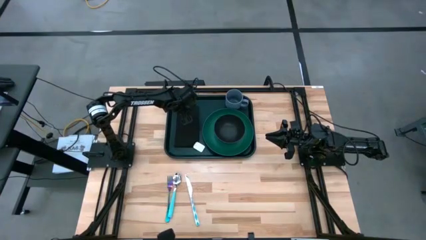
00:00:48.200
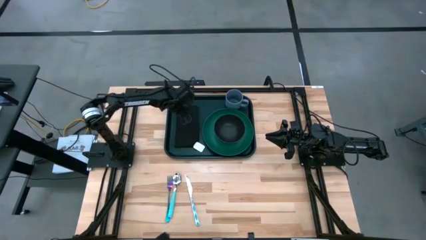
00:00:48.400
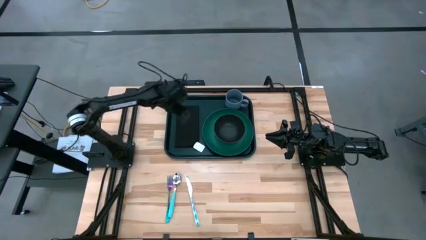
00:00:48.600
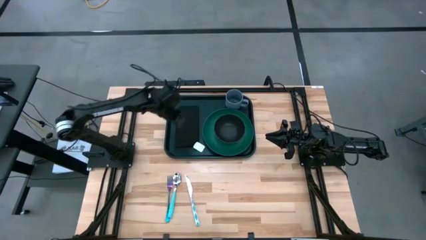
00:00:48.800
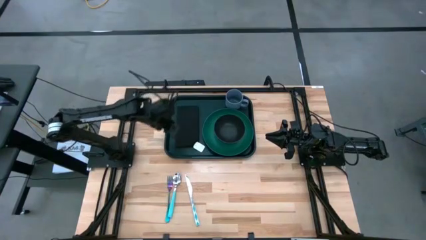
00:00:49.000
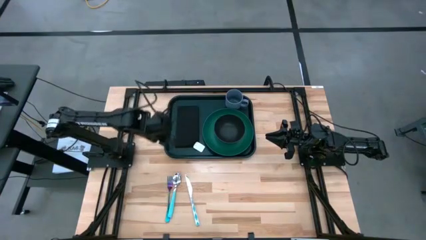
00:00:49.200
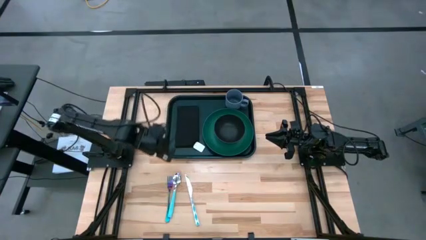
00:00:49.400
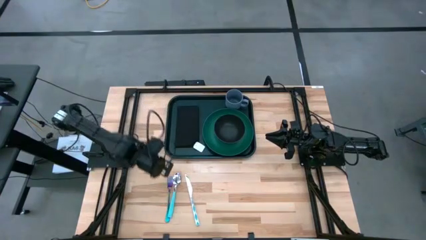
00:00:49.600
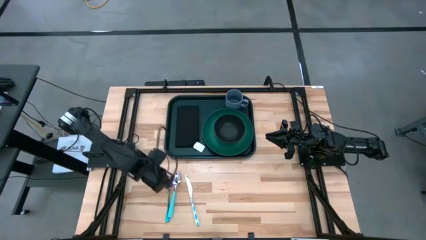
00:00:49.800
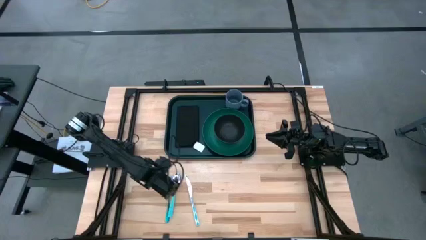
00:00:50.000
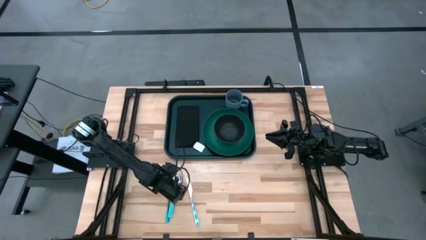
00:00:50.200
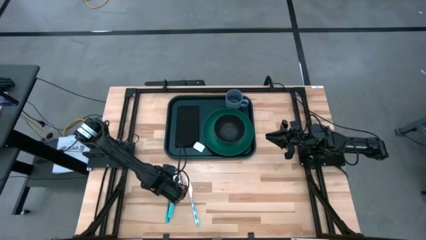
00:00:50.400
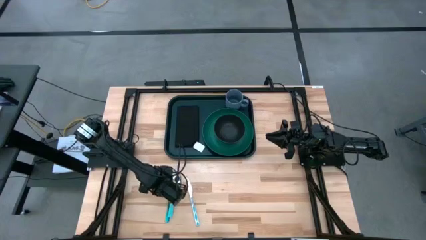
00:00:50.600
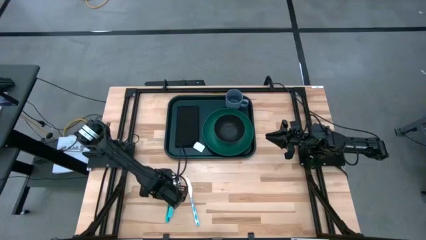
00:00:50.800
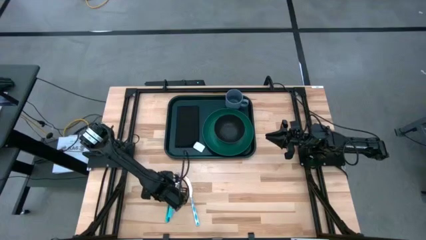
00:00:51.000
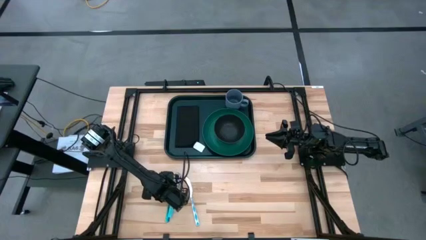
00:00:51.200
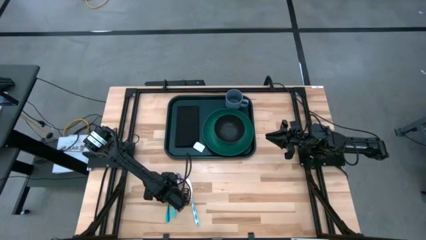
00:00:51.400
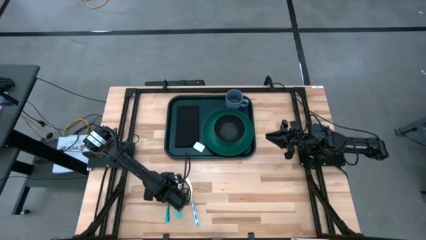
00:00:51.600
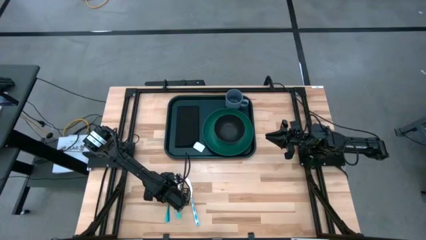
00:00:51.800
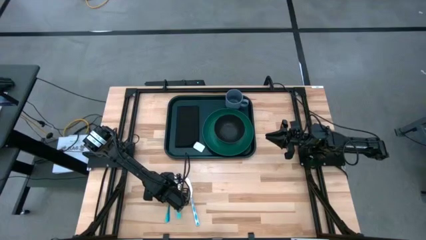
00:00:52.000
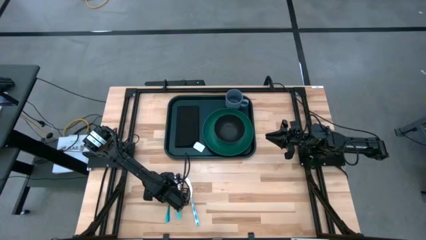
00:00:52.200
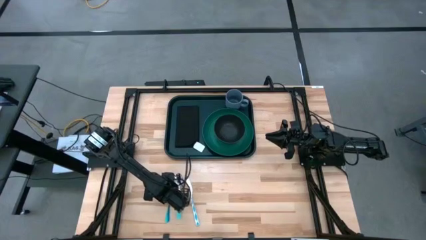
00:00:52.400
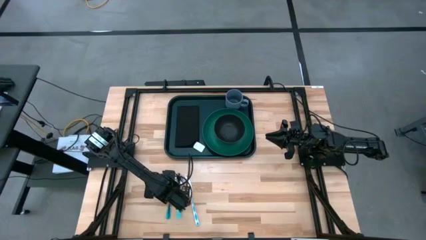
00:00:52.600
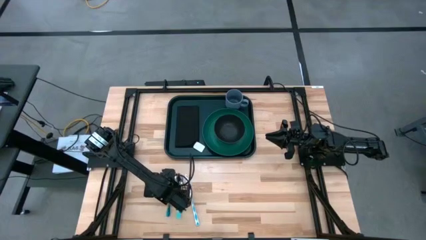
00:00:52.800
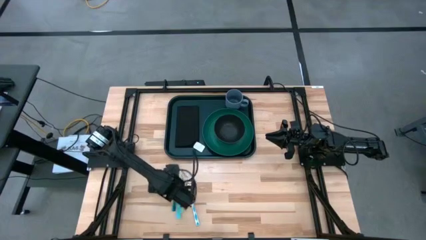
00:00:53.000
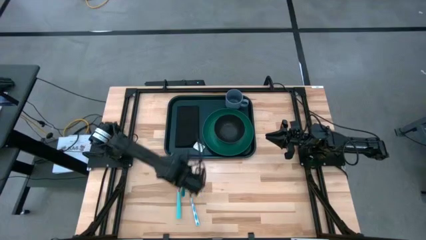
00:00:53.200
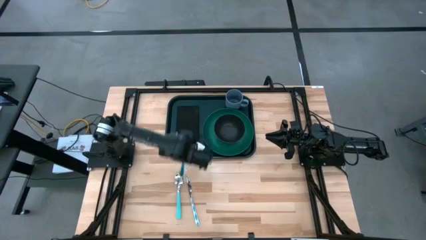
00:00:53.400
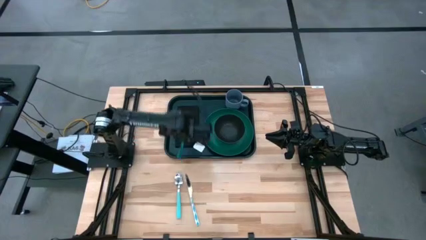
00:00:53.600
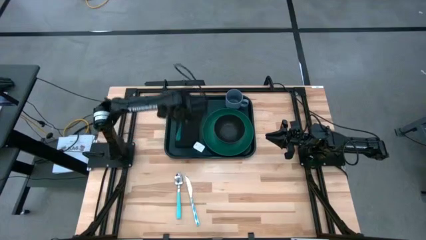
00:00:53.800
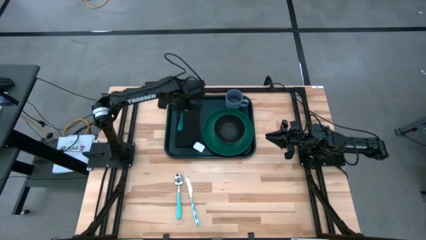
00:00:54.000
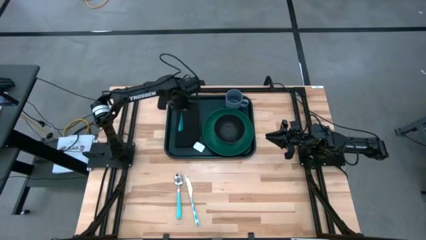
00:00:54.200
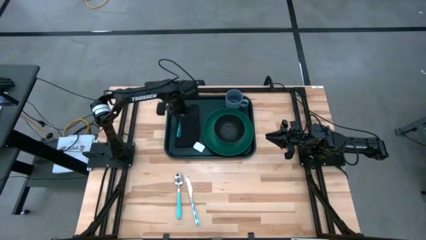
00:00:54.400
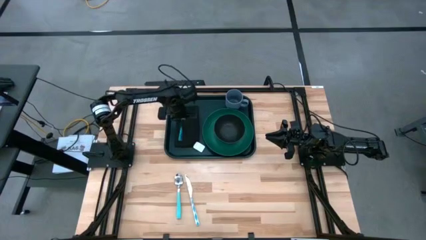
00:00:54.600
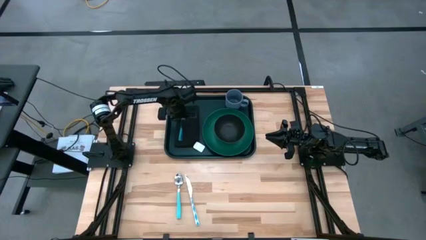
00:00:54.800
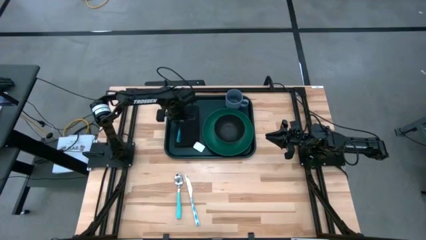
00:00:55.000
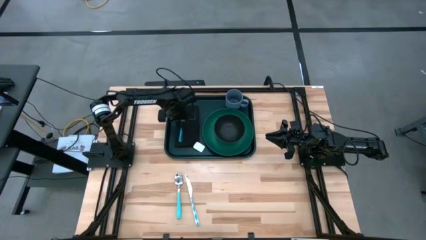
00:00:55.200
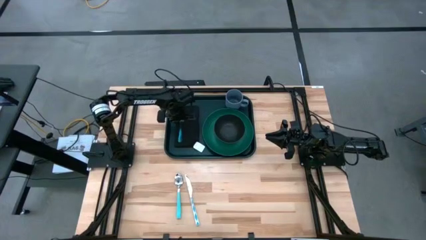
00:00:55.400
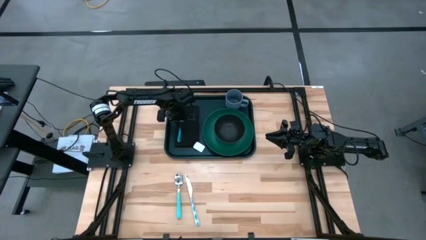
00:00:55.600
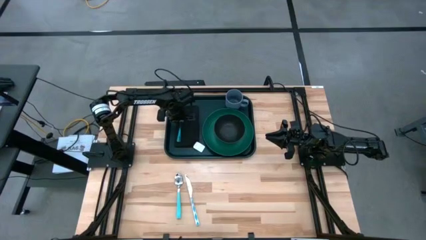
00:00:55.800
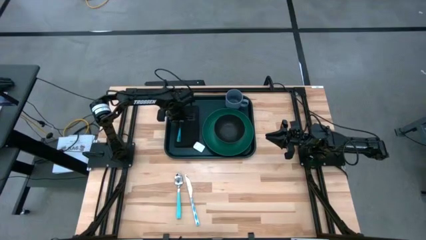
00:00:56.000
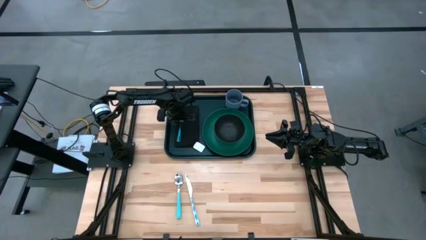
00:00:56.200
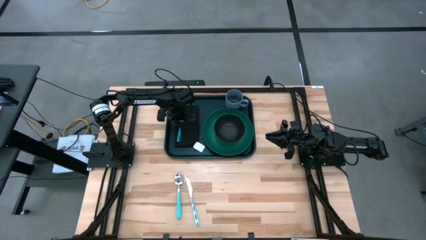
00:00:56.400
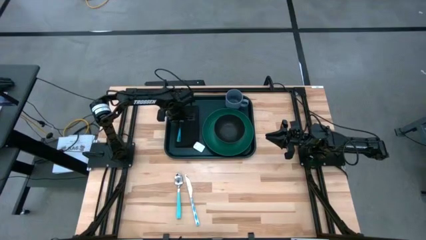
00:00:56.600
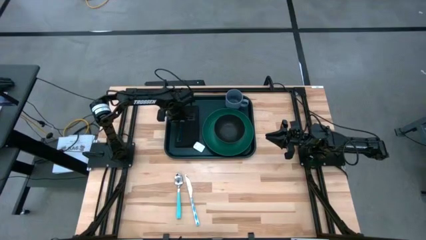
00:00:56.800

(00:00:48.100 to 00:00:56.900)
Task: Set up tray
Put the blue fork on top of the black towel on the black serving tray

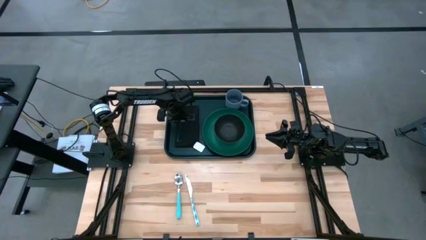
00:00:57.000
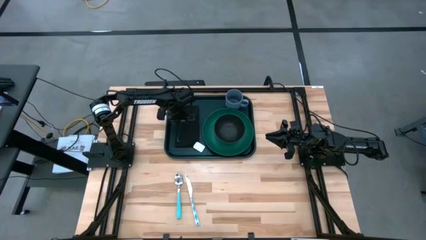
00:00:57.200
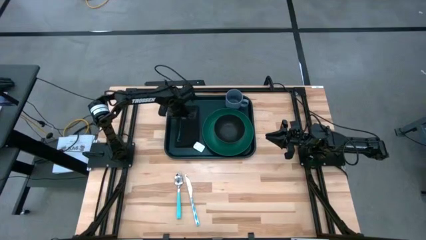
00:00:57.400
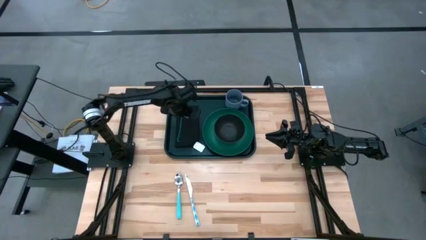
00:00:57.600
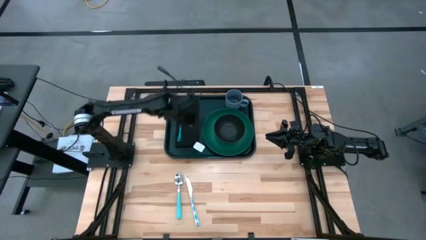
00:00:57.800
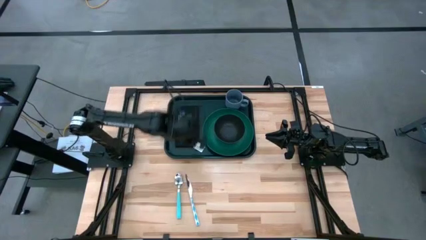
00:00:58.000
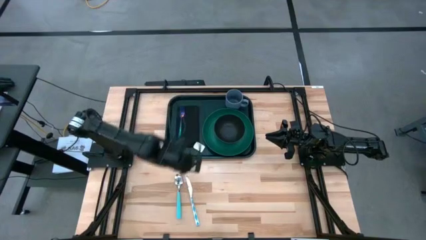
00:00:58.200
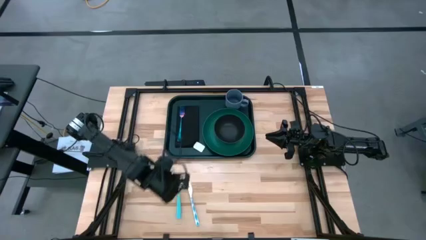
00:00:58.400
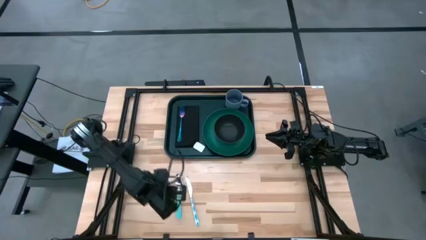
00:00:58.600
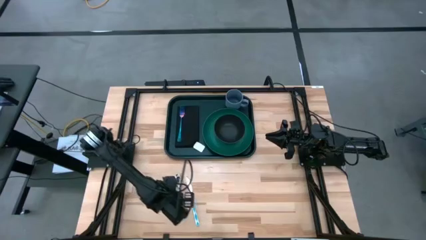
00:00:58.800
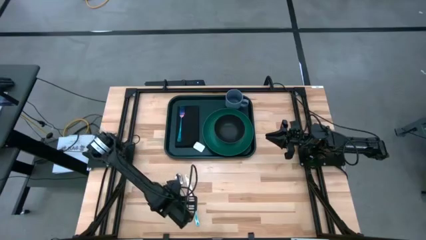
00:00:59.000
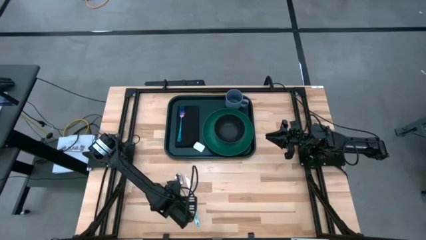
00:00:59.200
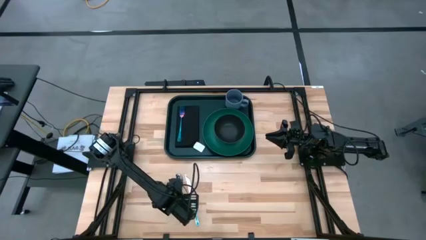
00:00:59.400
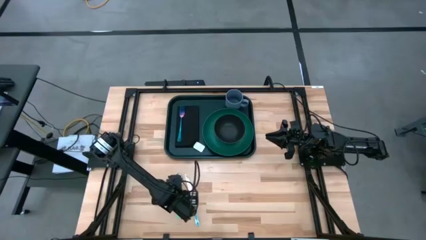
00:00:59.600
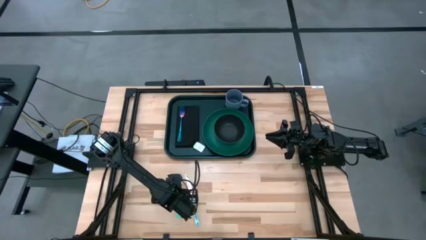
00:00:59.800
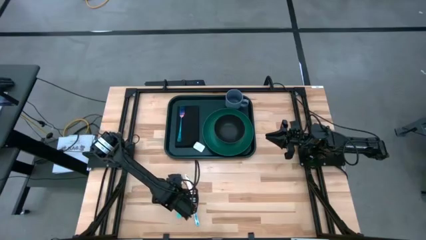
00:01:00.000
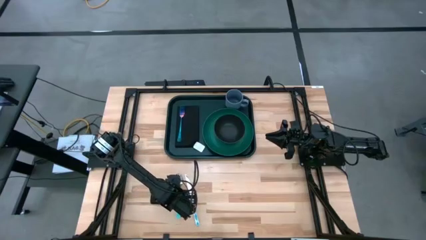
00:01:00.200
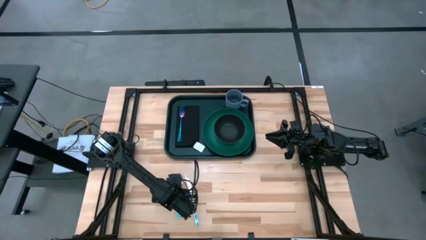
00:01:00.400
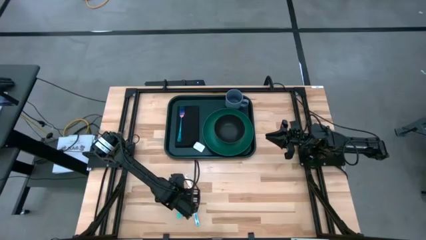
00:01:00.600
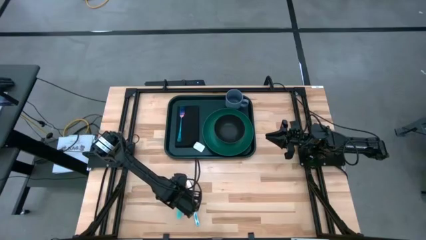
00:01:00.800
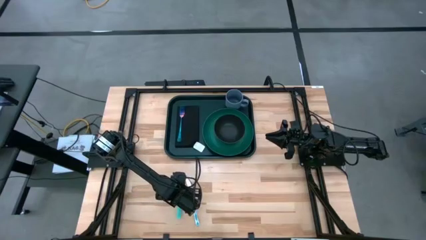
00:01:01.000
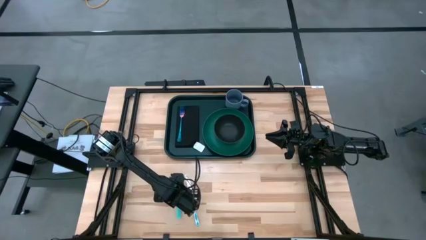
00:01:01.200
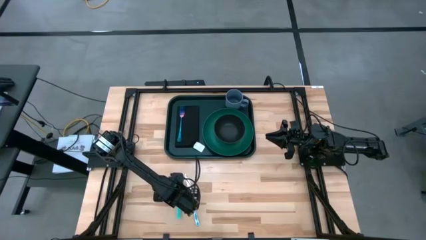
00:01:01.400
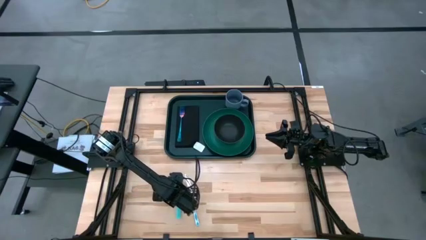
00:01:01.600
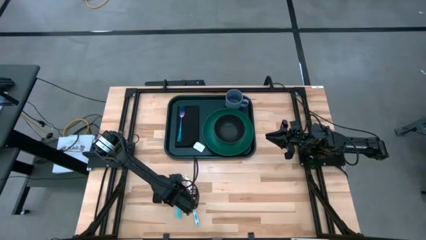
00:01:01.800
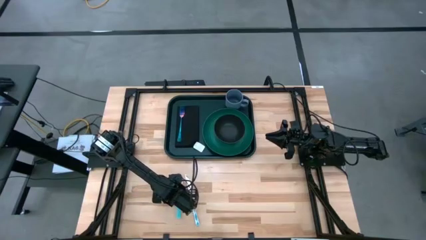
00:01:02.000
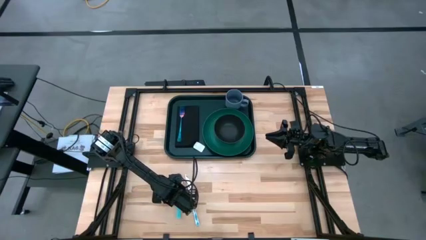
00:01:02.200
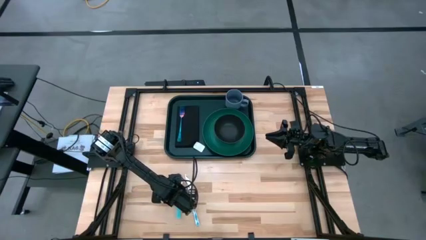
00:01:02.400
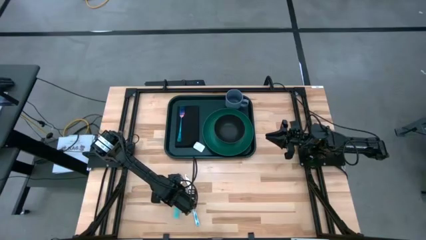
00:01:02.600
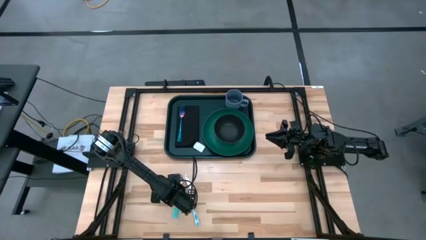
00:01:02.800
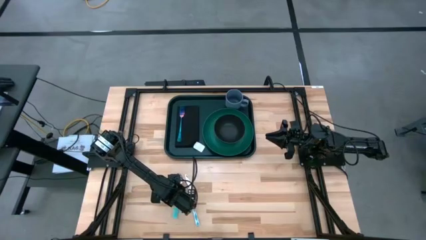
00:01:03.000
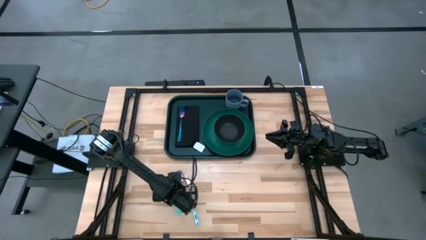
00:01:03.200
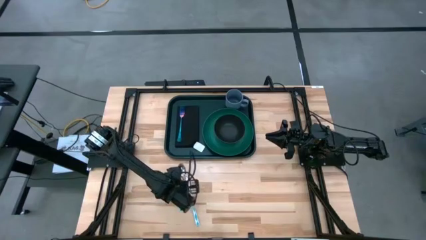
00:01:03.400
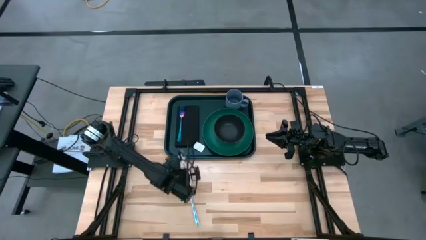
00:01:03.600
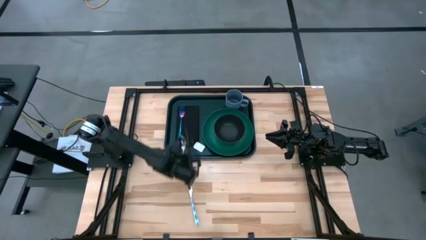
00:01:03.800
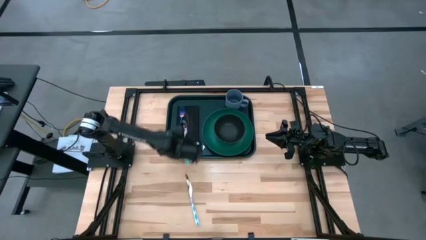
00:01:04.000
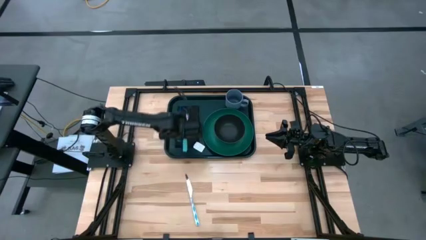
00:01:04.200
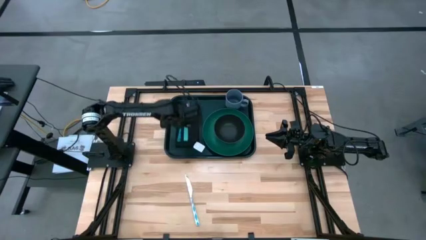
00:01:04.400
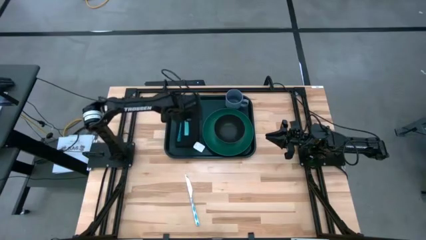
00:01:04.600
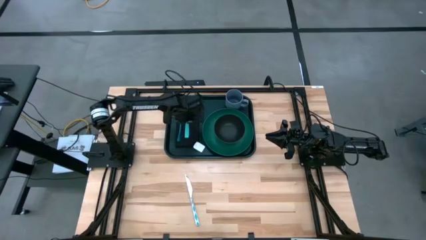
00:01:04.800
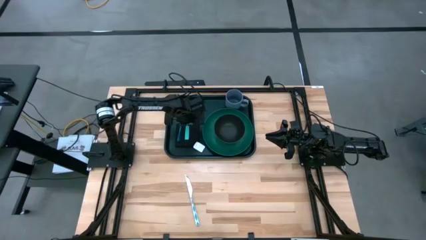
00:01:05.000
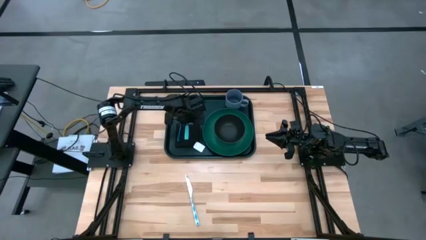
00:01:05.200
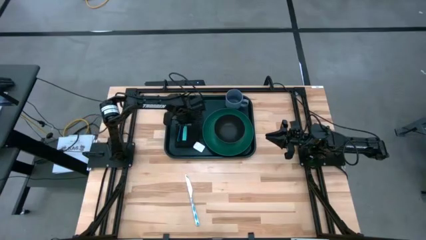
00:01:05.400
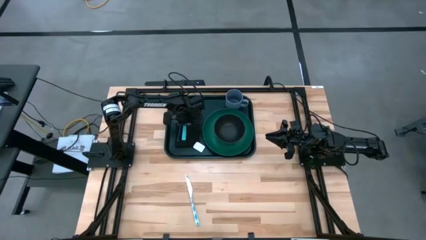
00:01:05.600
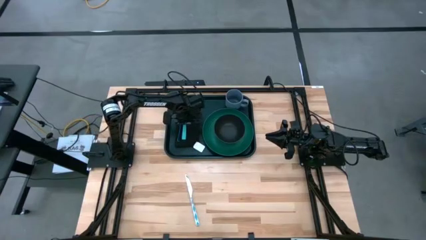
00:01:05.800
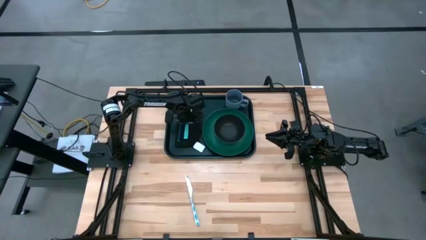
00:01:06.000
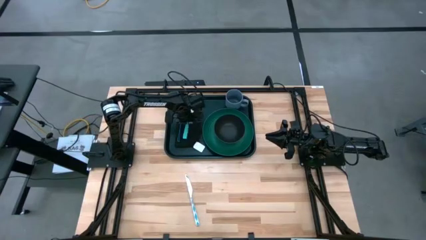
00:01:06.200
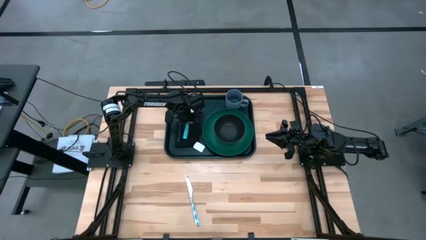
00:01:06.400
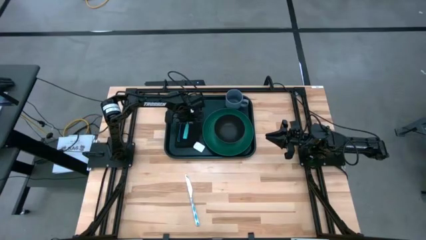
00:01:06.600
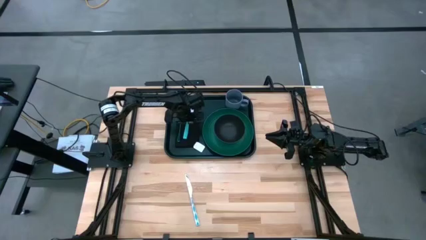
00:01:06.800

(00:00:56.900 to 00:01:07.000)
Put the light blue spoon beside the blue fork on top of the black towel on the black serving tray
